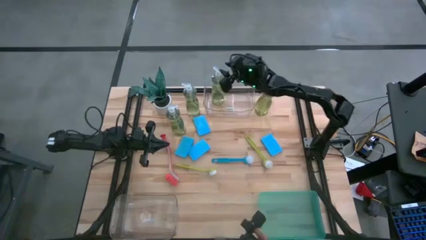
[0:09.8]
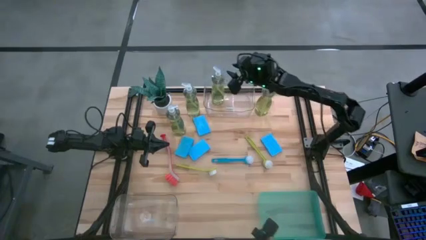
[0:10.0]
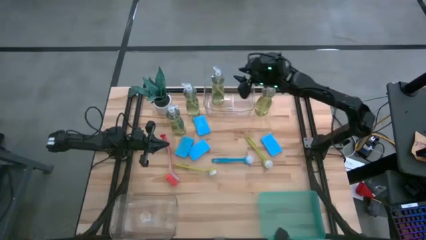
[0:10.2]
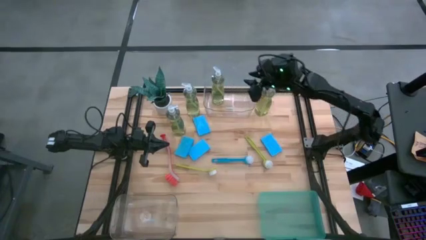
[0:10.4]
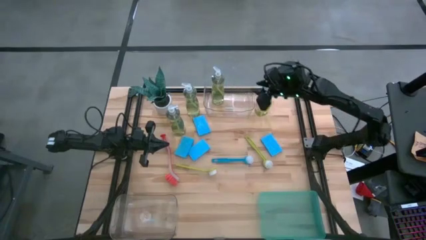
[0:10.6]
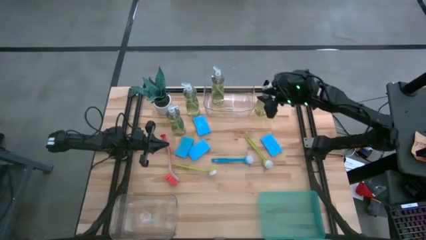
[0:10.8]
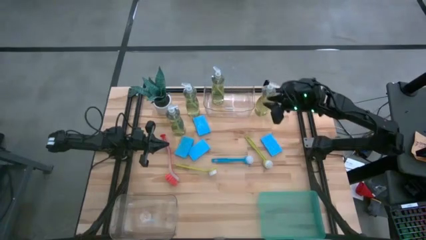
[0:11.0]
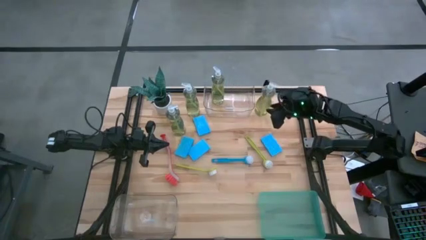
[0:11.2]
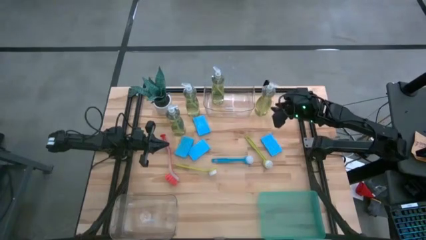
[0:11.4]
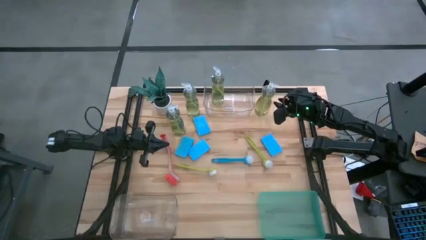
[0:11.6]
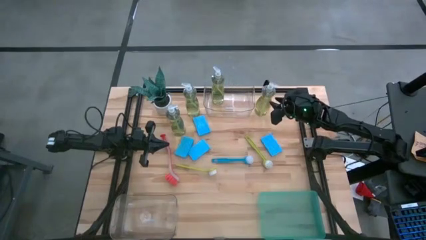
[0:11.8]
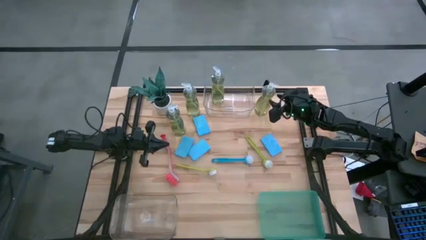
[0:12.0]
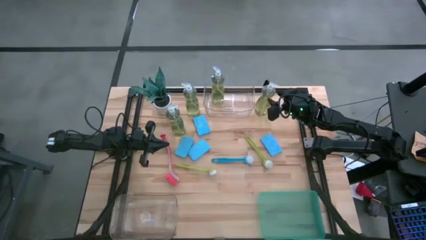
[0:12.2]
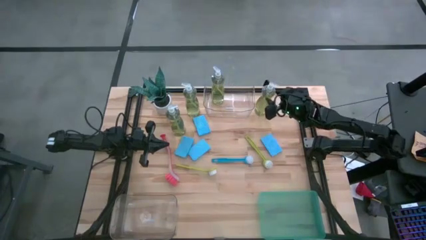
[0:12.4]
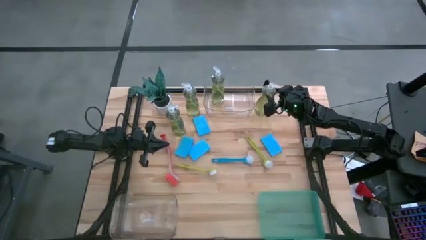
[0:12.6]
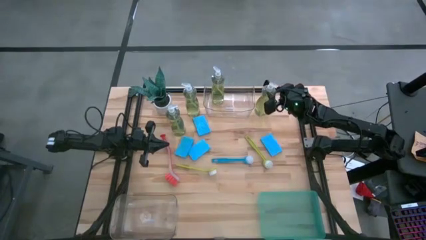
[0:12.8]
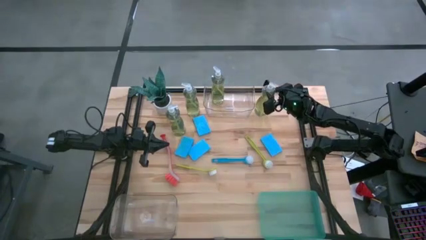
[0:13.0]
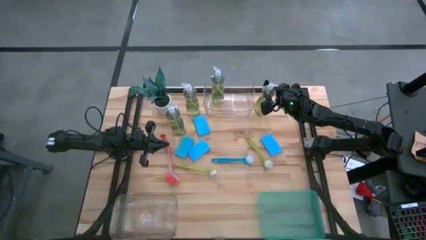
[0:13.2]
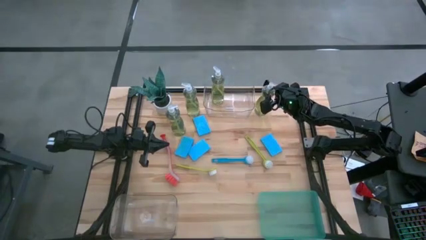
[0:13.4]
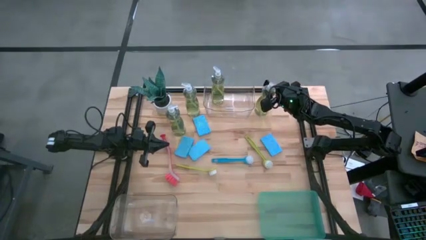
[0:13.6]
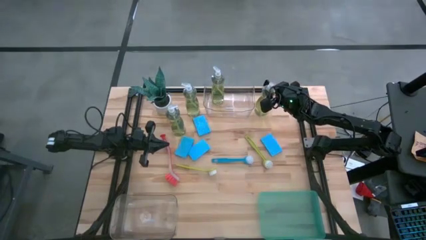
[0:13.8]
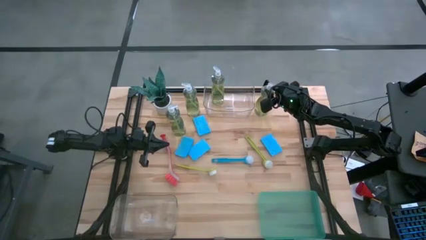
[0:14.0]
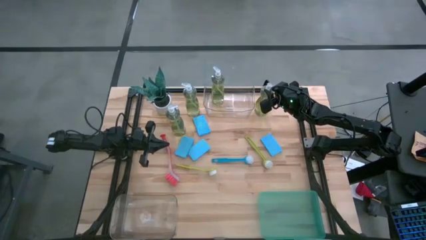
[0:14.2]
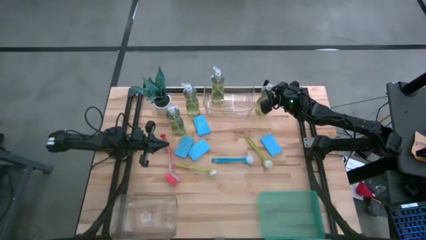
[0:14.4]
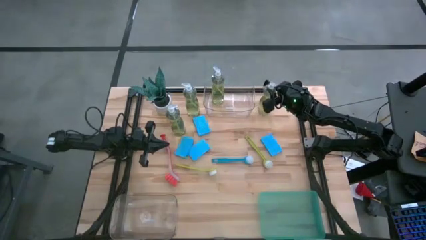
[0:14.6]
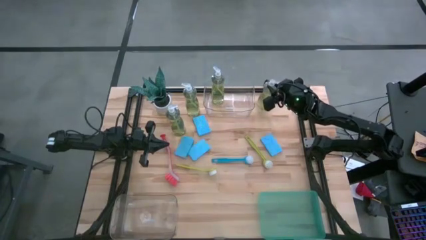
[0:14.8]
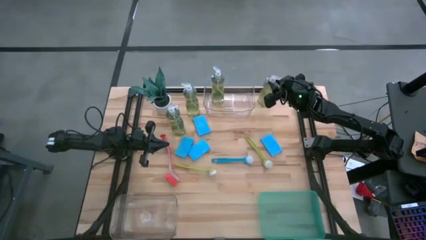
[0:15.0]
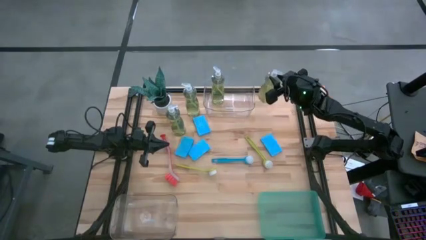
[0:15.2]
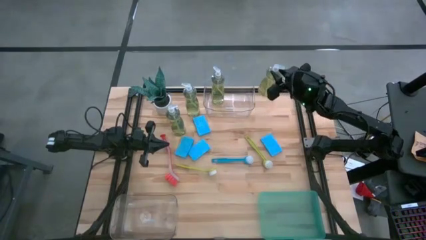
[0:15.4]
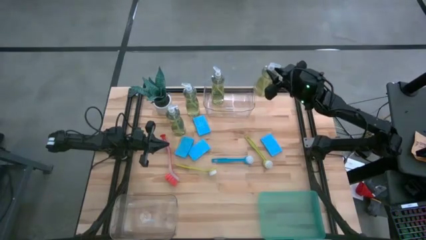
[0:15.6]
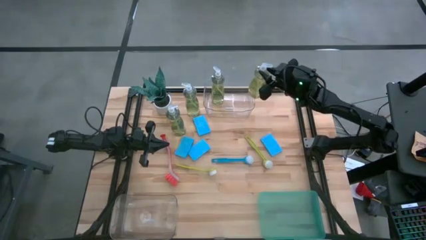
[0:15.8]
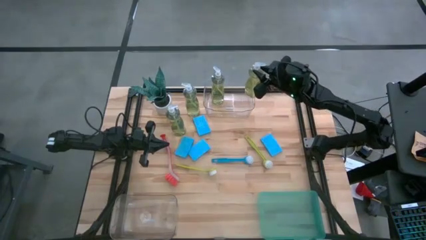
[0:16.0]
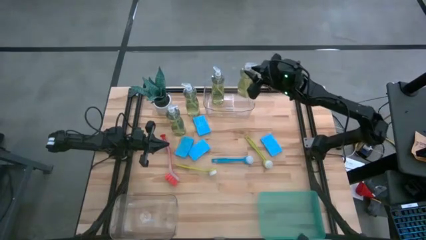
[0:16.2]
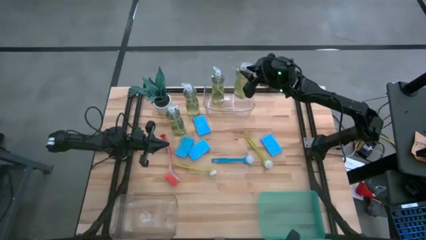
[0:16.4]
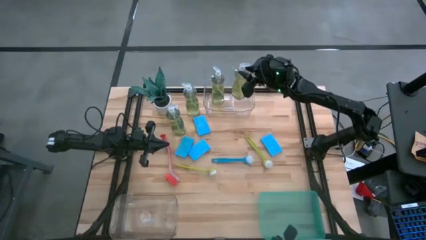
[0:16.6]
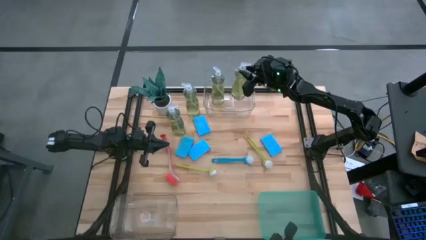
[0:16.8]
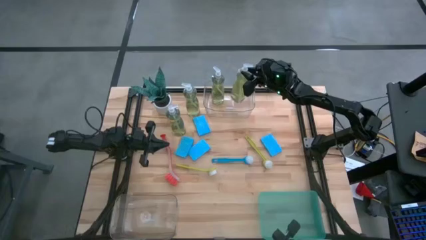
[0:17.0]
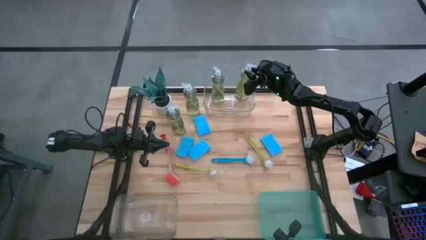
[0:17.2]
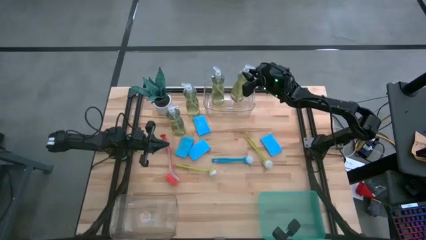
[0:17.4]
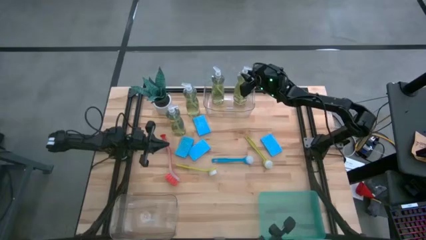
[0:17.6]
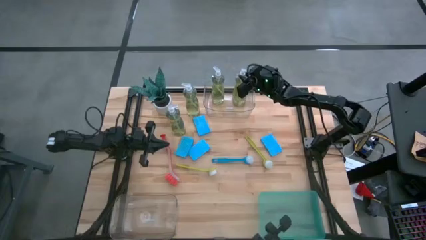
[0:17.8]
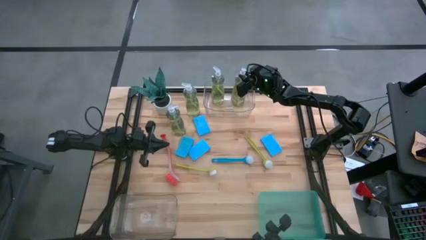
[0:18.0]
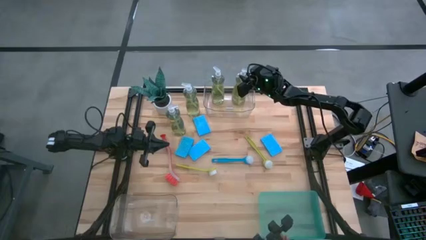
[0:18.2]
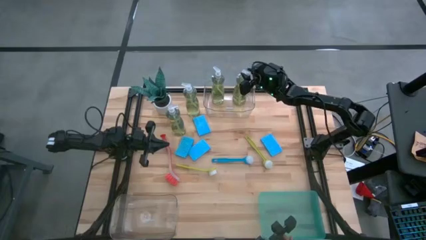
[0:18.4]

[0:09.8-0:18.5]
Task: Pick & Place Kitchen Sink Supplies
Put the liquid detergent into the top transparent bin

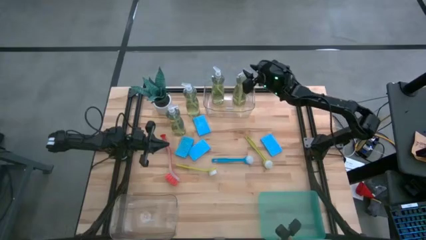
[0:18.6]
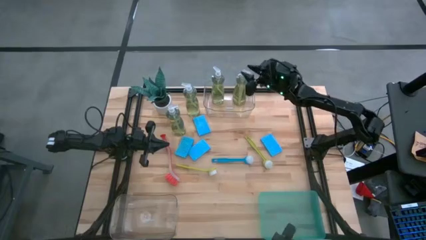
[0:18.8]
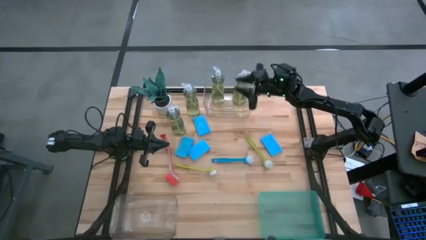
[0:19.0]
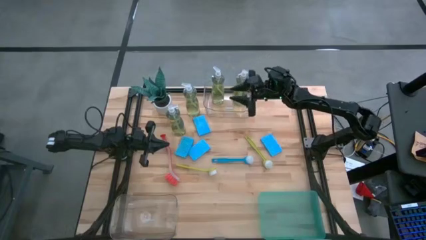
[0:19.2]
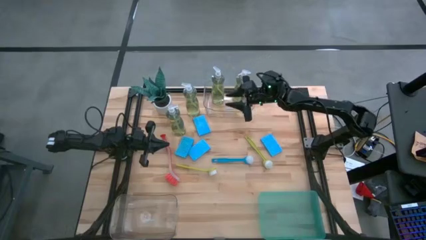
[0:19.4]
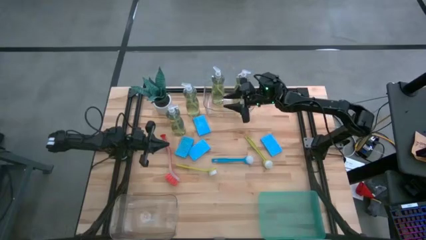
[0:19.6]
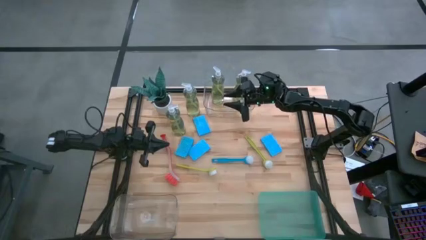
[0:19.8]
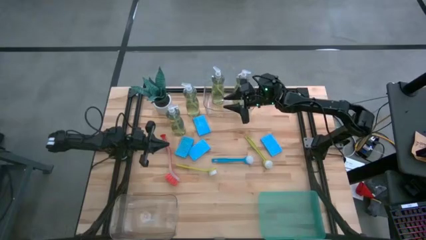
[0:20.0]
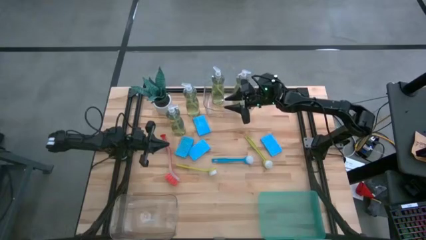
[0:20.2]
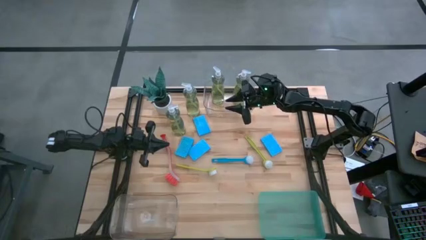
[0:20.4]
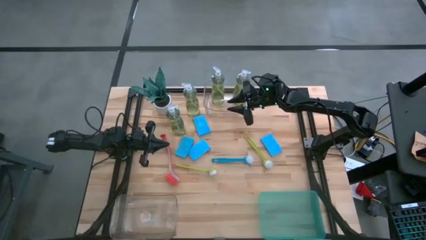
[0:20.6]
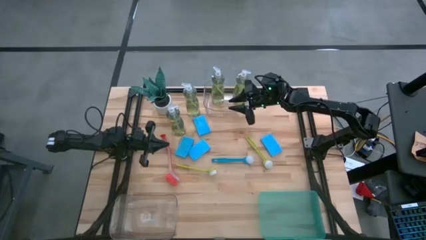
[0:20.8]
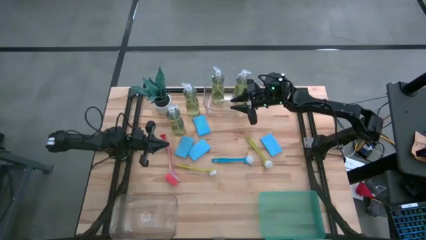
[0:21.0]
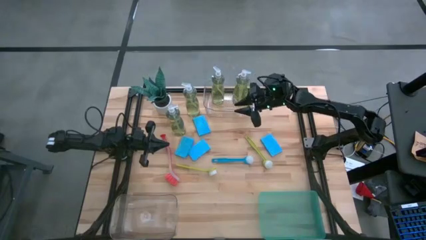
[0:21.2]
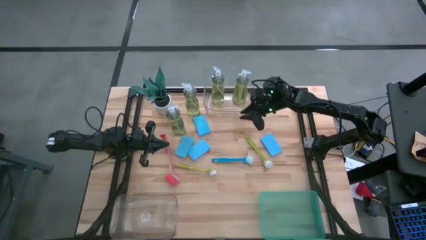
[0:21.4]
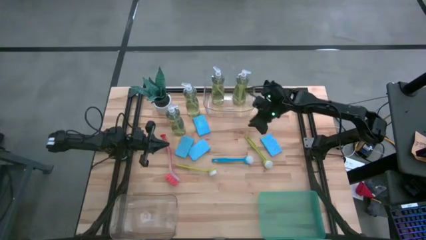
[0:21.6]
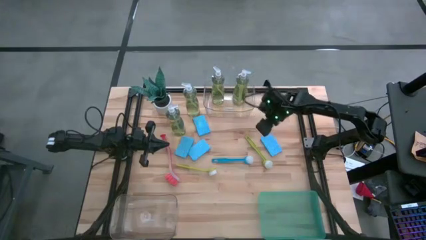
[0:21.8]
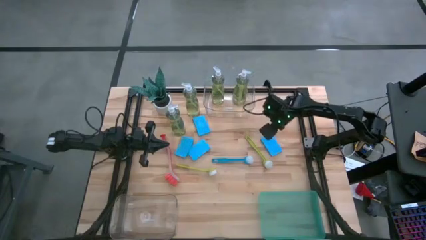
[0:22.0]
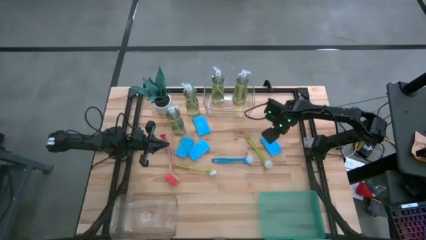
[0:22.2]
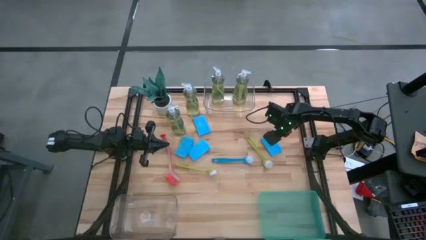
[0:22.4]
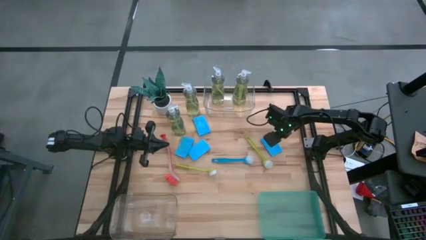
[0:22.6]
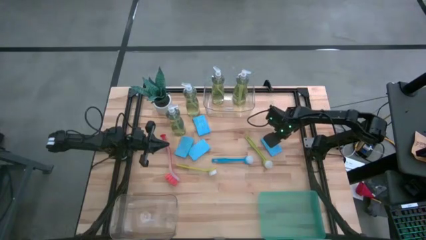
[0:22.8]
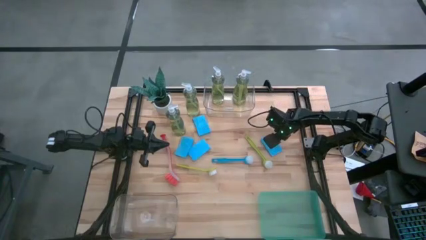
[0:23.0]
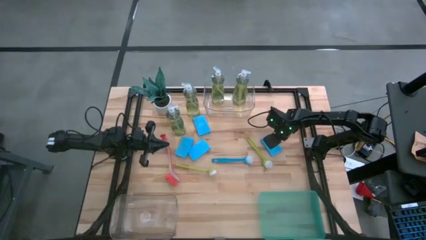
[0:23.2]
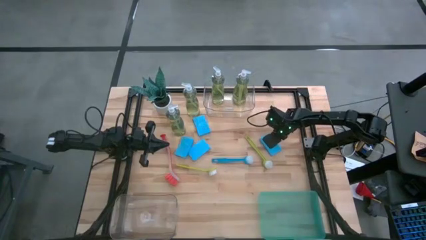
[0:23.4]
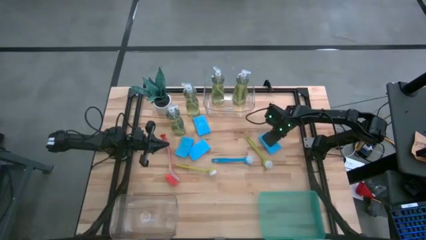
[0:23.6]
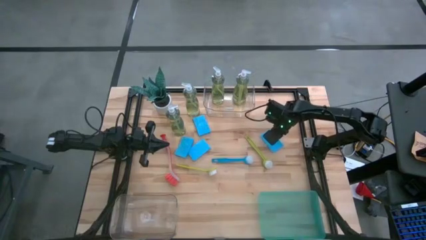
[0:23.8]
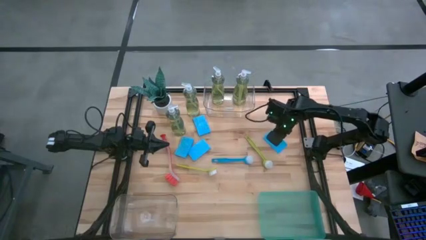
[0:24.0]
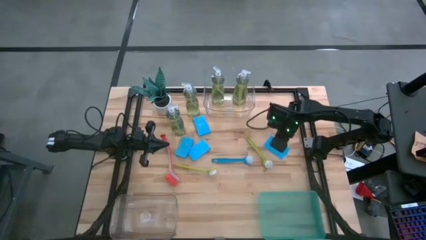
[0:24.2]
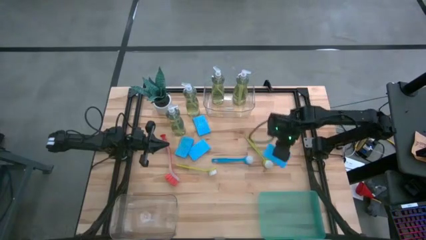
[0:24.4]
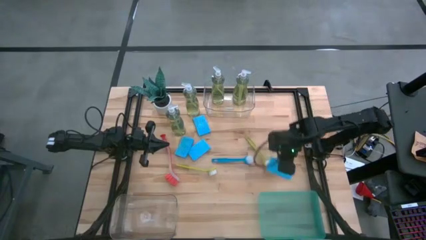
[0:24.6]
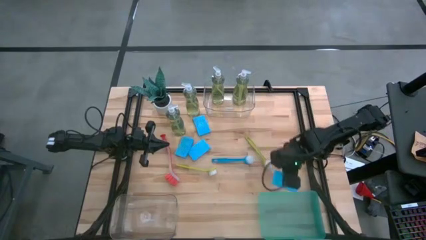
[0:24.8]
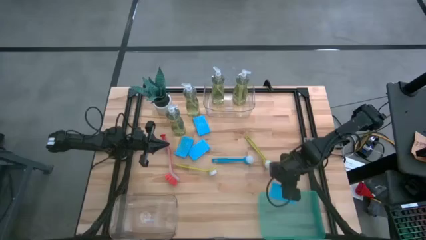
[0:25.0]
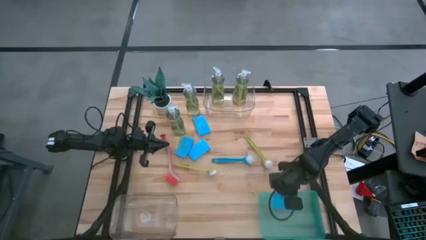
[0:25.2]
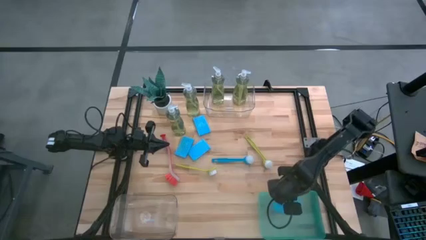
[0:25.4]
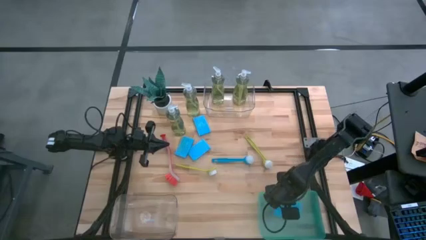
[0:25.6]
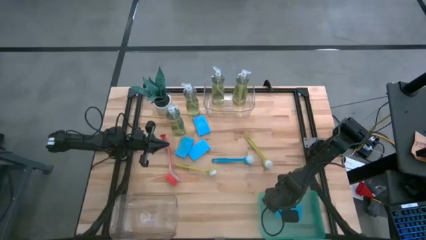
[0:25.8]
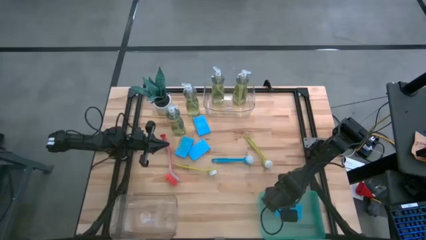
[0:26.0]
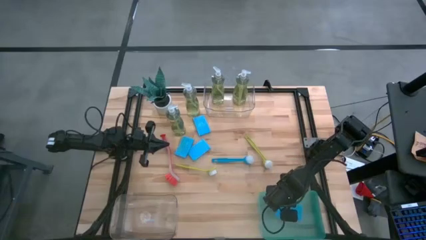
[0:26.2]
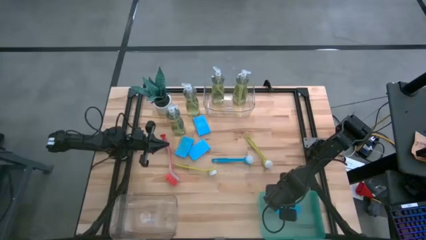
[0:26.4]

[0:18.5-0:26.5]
Put the blue sponge into the green bin
